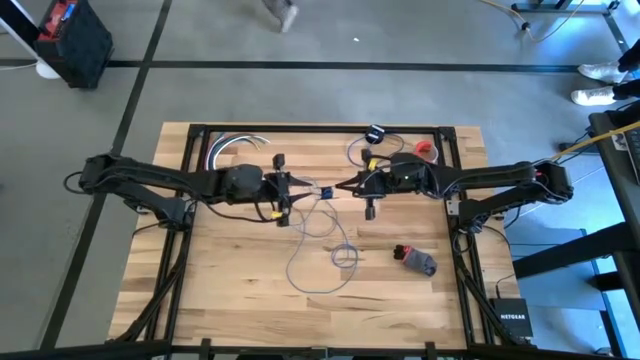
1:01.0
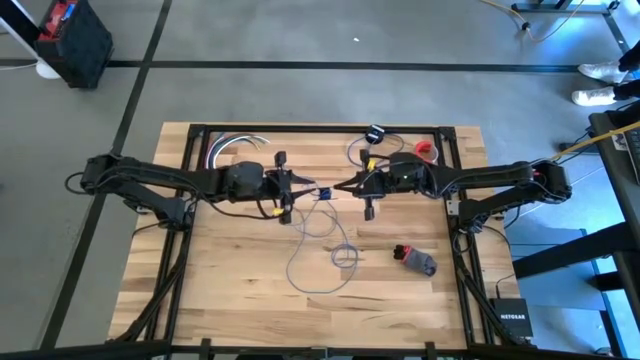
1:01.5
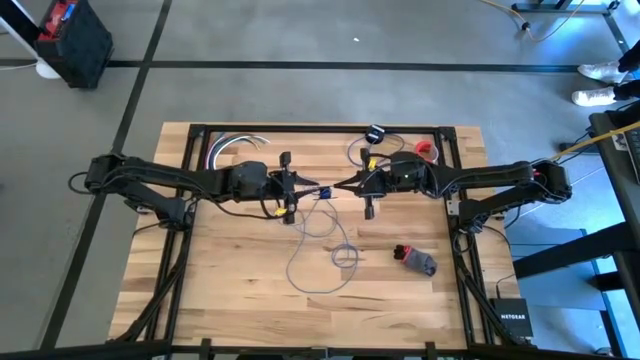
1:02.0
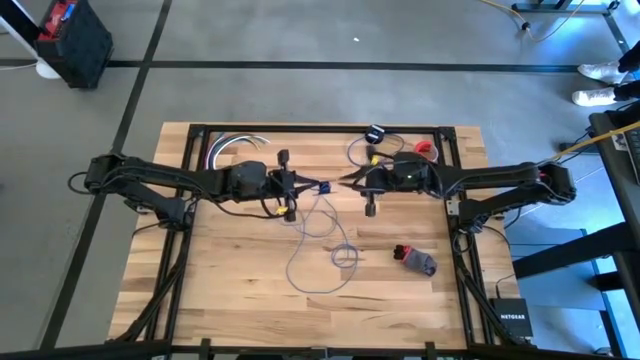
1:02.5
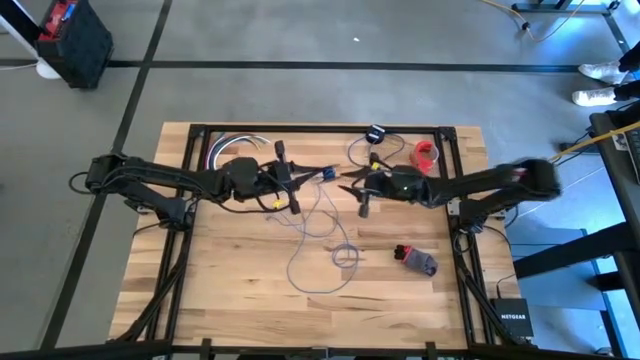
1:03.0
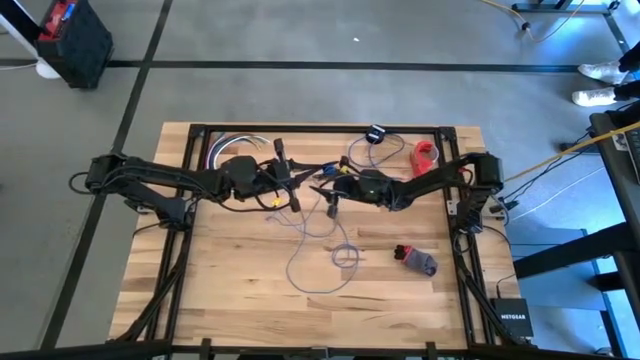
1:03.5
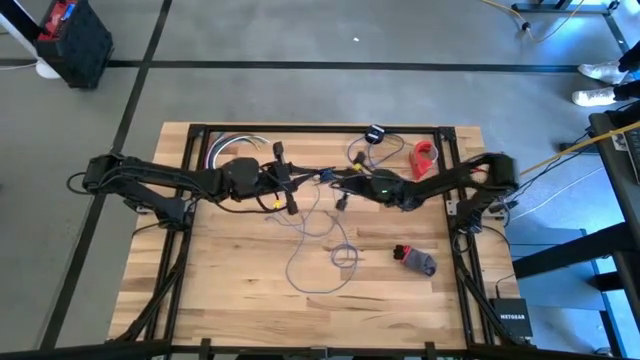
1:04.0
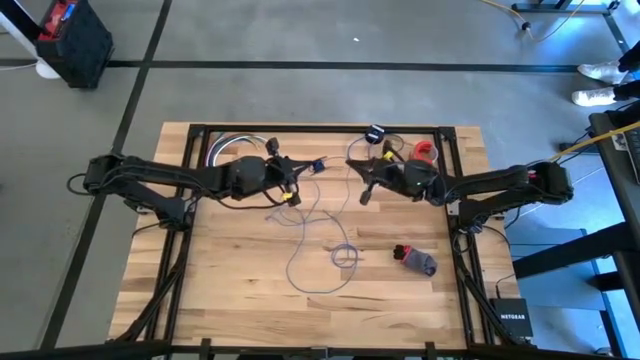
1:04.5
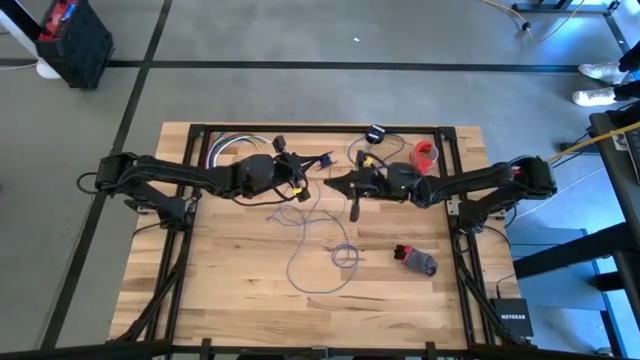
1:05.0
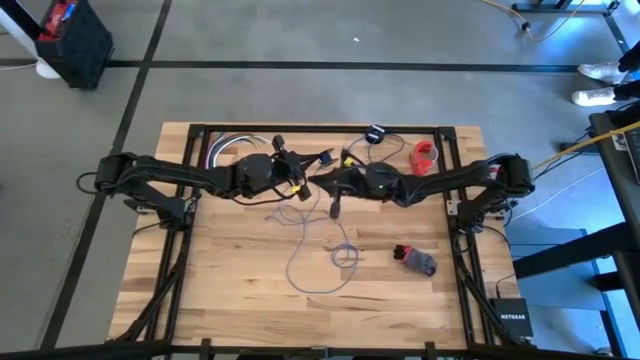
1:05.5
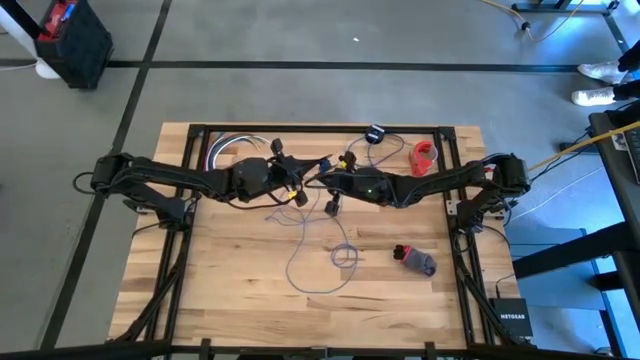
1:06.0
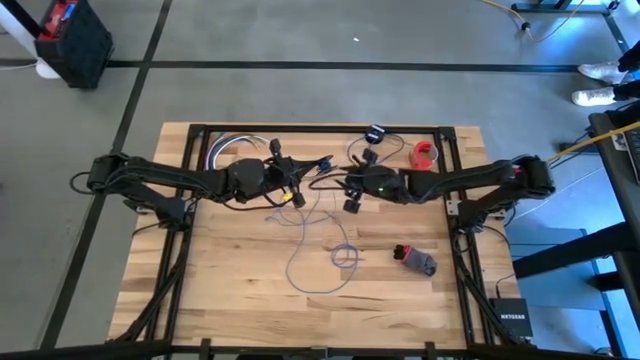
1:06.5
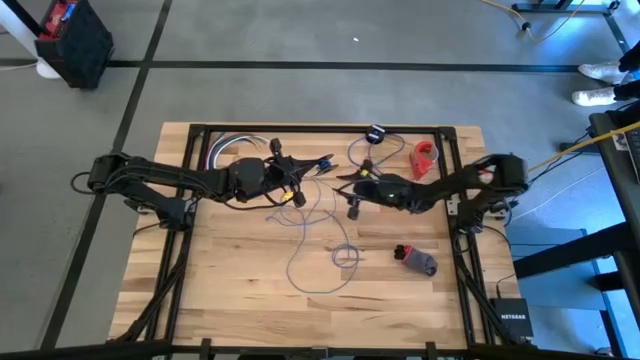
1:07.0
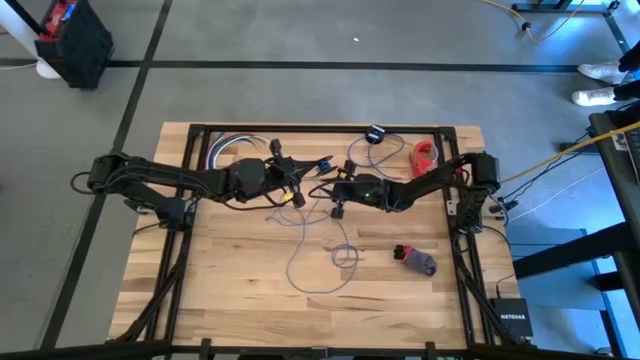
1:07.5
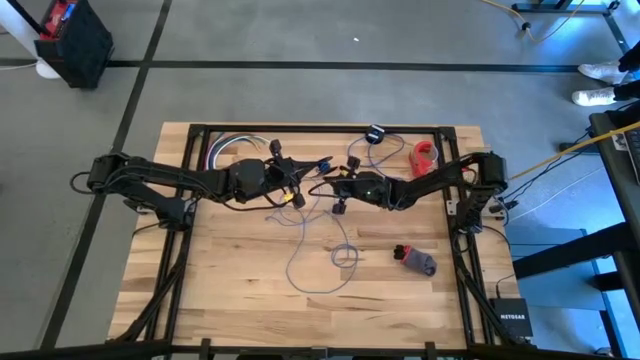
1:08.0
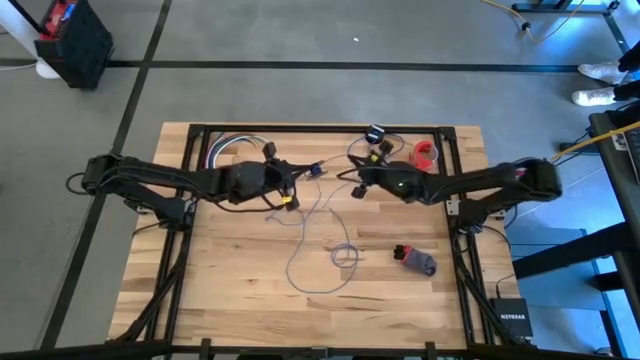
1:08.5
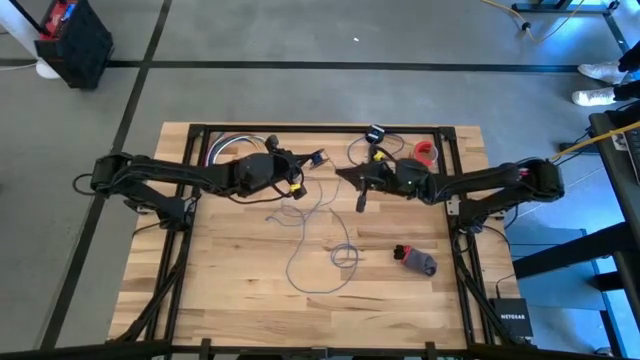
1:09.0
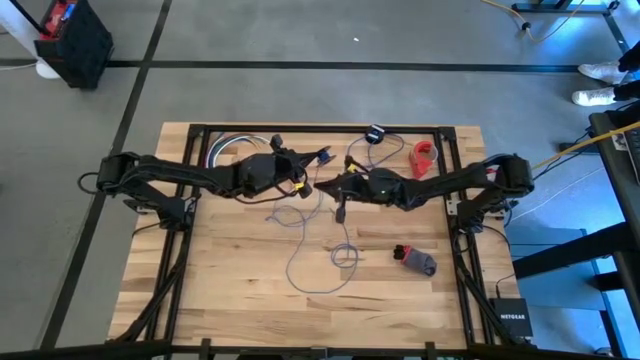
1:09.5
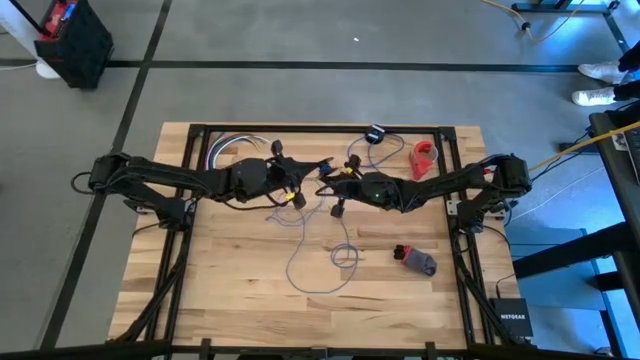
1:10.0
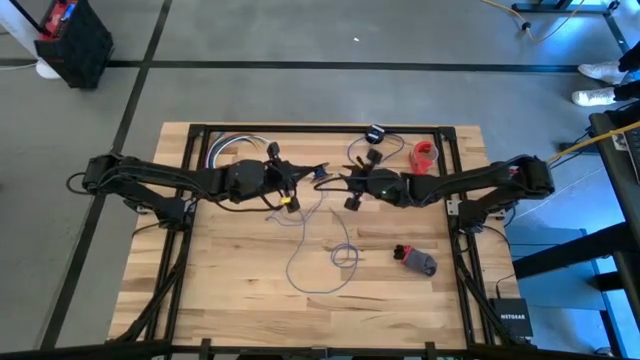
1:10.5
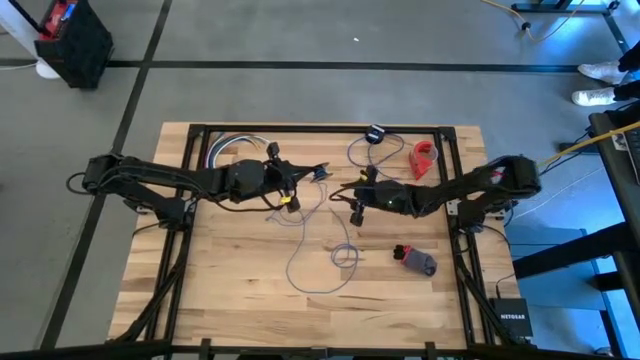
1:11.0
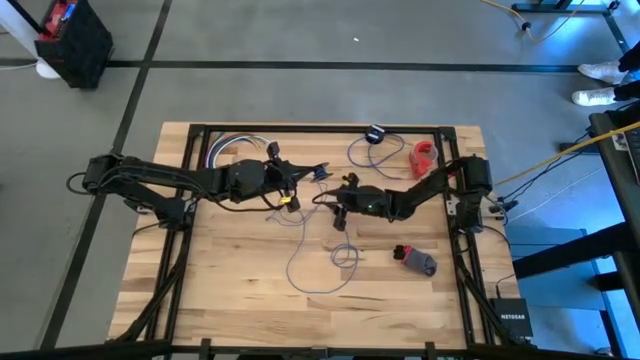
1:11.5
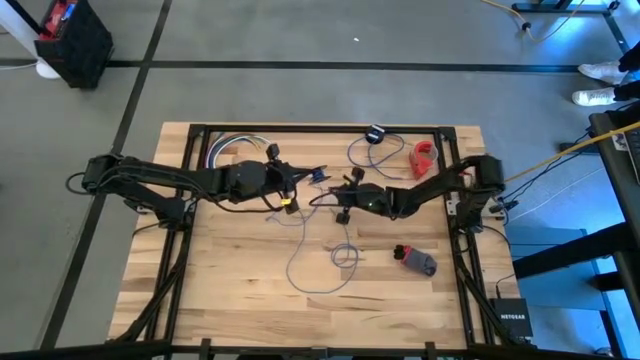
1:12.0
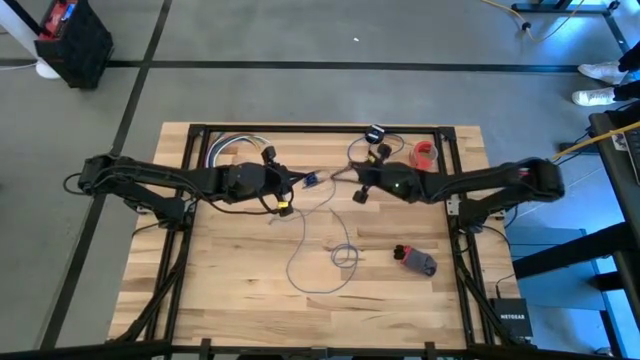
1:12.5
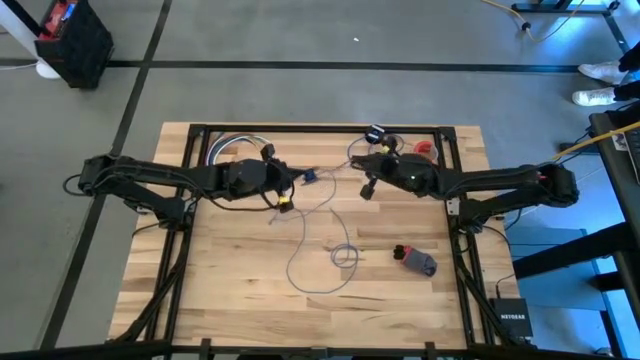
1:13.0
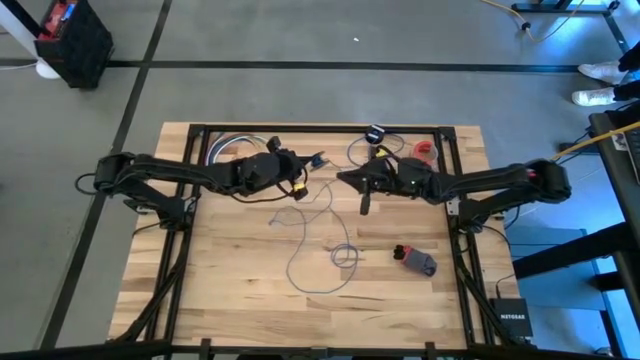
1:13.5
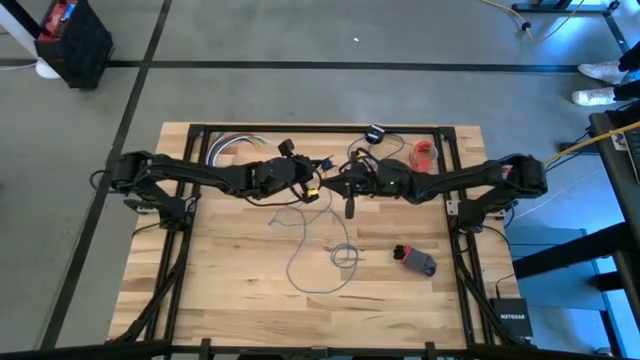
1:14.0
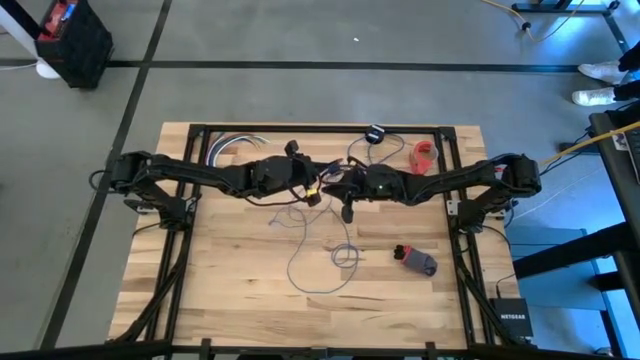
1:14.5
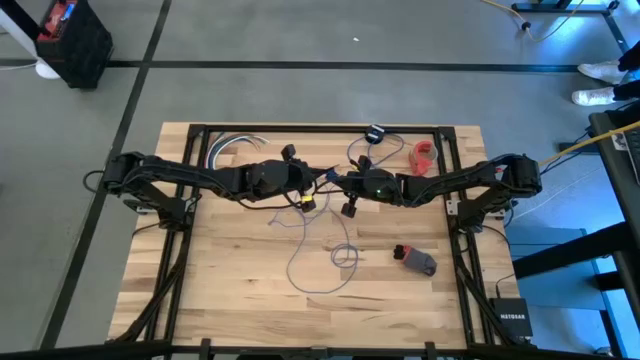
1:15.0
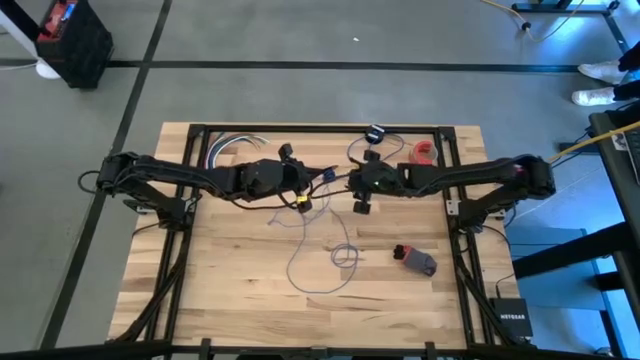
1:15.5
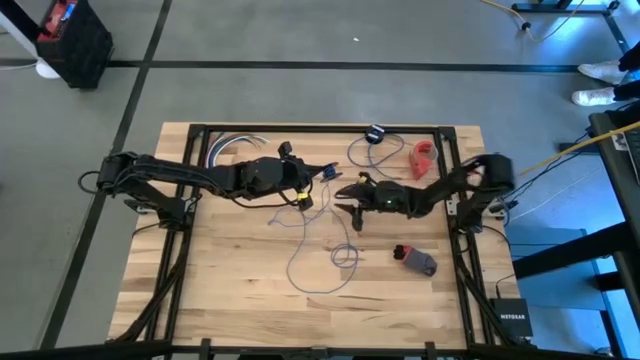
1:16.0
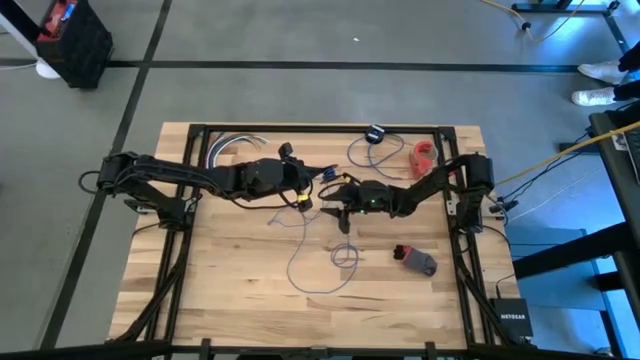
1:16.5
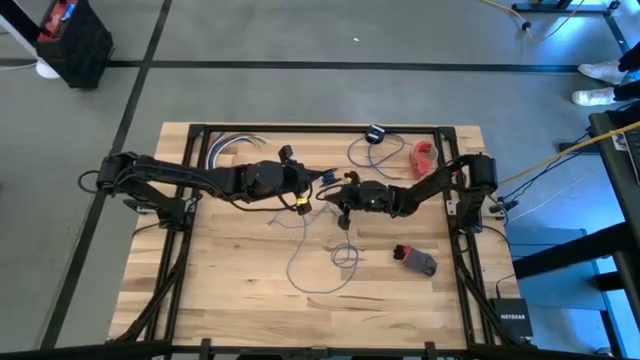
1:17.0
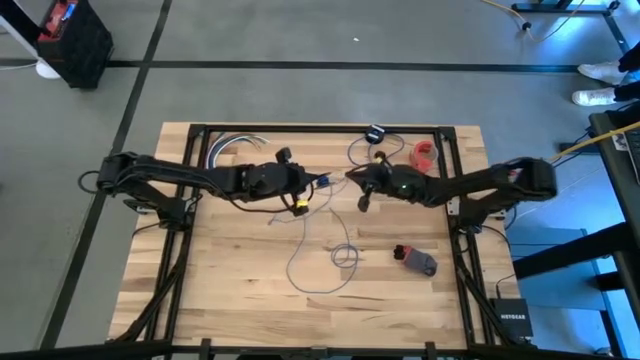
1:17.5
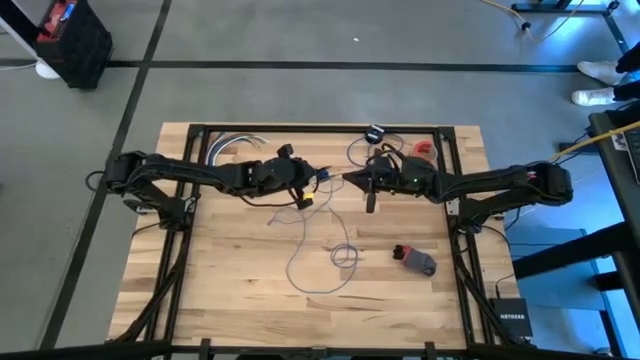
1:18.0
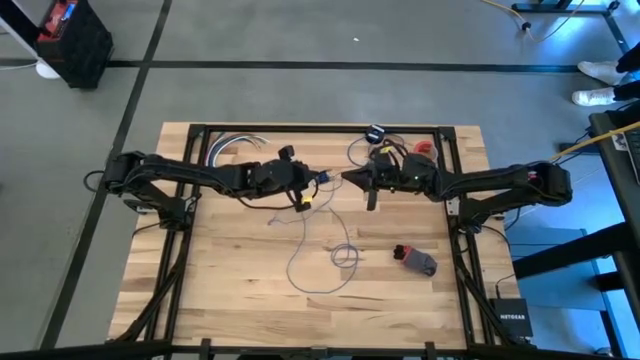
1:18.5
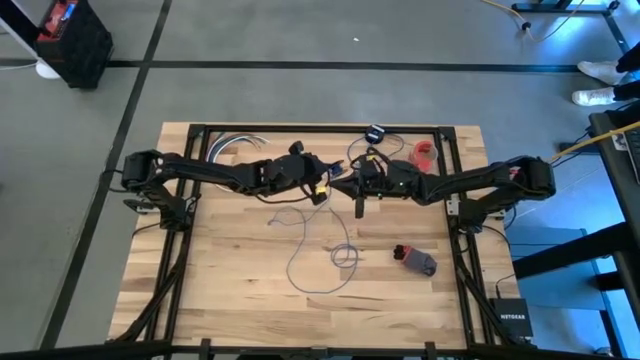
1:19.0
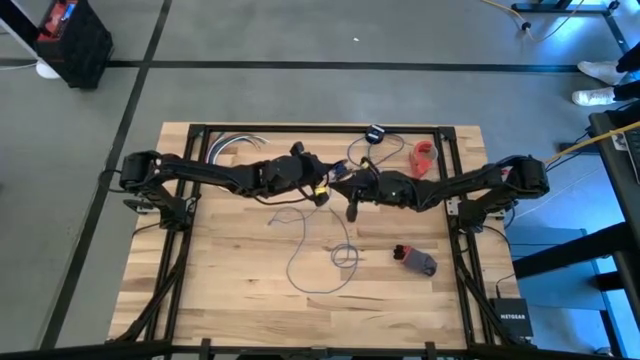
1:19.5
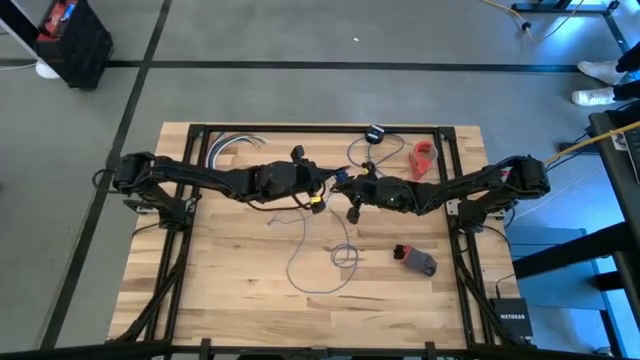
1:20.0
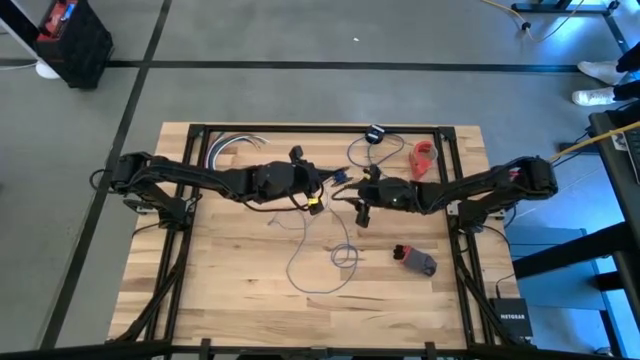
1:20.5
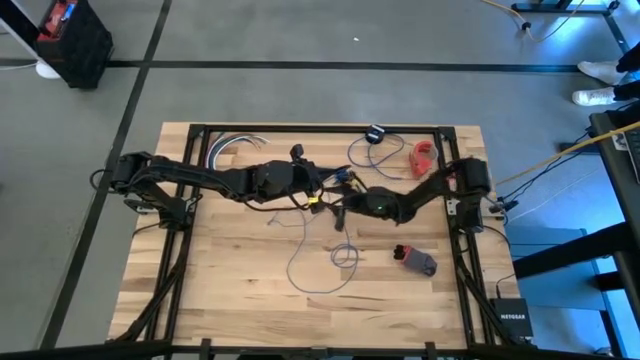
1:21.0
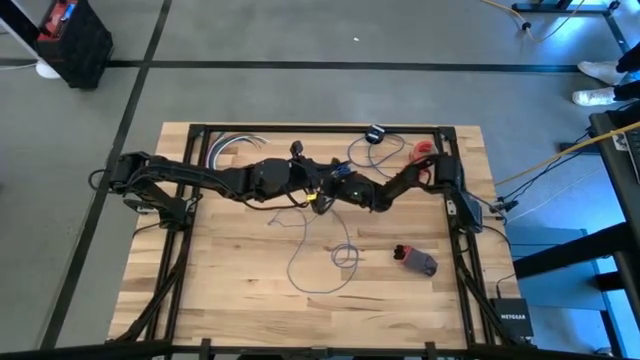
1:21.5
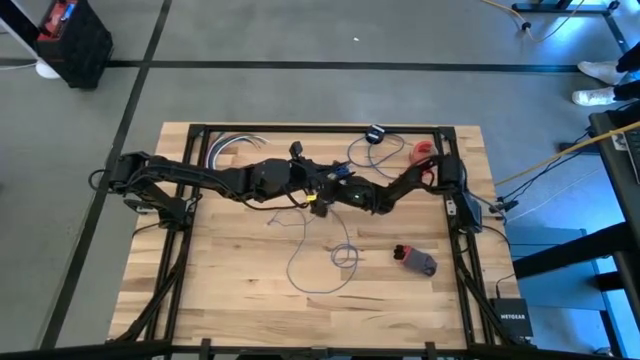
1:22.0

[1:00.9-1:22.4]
Task: Coil cords
Coil the blue wire onto the spool
